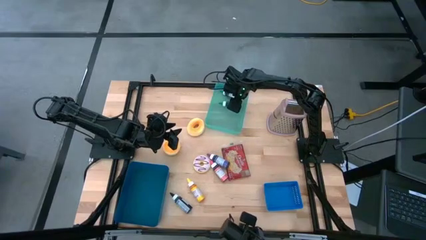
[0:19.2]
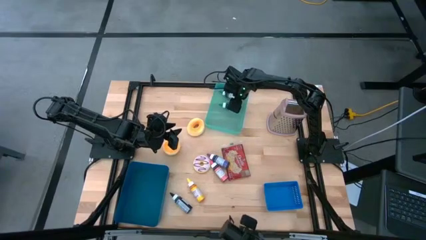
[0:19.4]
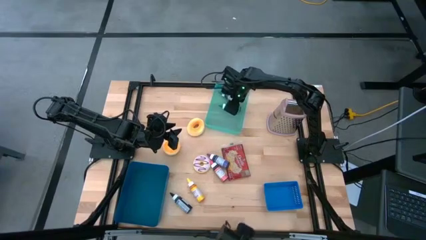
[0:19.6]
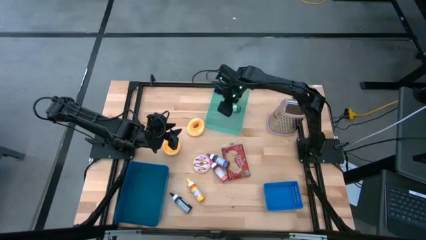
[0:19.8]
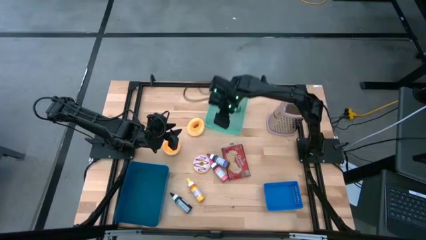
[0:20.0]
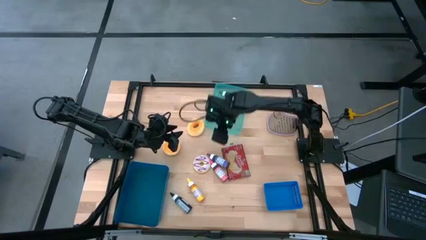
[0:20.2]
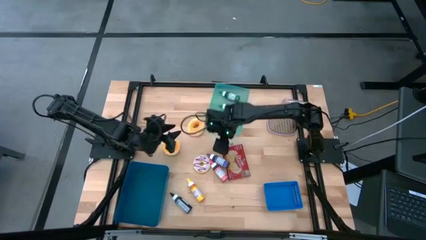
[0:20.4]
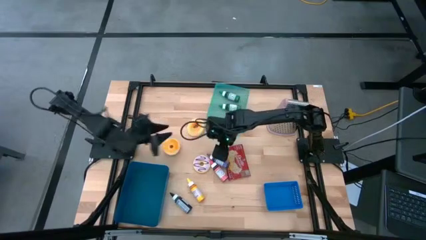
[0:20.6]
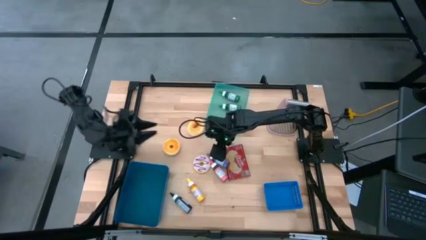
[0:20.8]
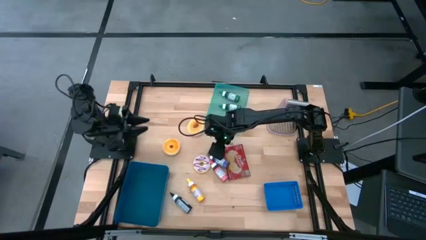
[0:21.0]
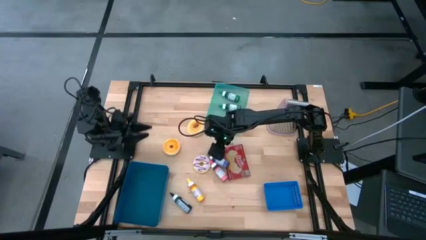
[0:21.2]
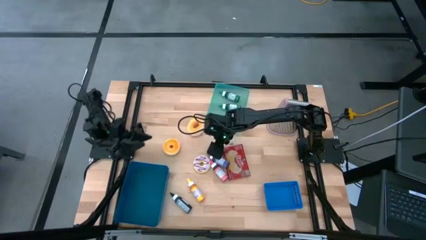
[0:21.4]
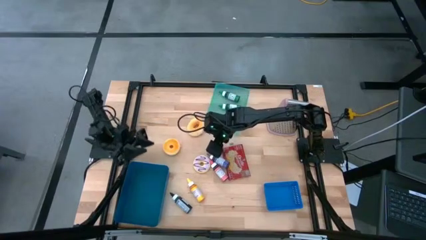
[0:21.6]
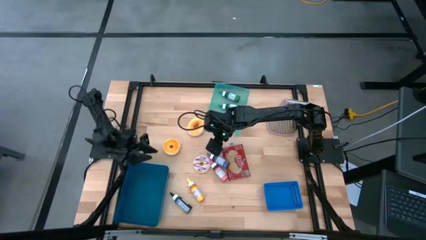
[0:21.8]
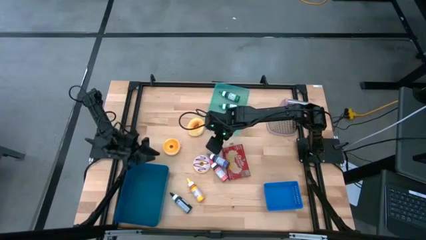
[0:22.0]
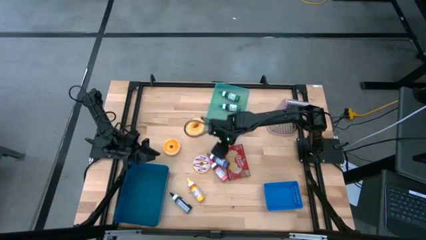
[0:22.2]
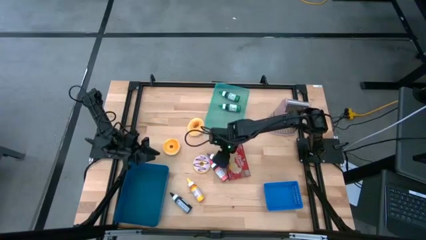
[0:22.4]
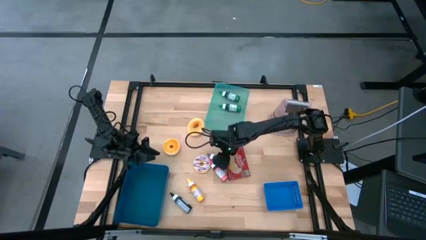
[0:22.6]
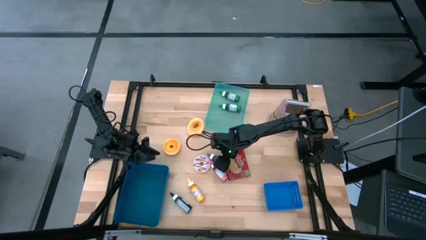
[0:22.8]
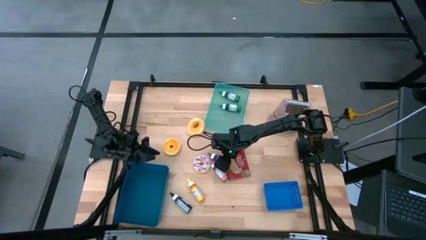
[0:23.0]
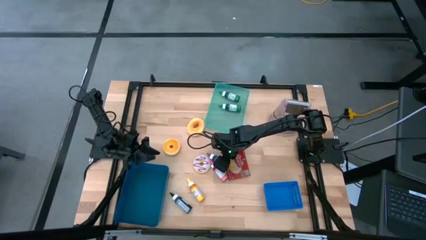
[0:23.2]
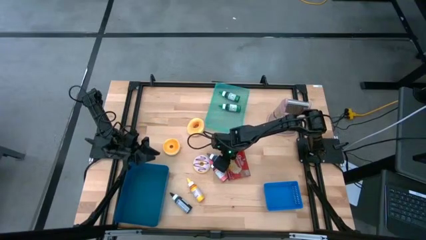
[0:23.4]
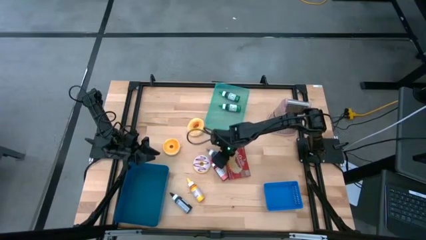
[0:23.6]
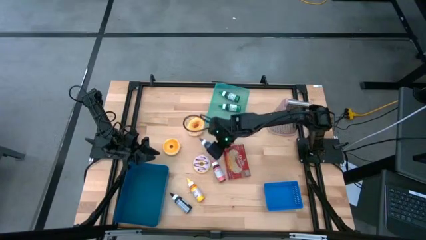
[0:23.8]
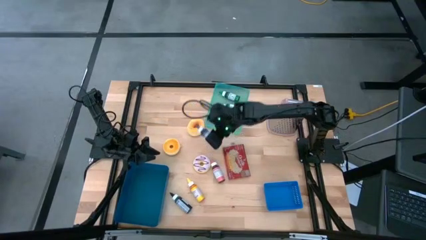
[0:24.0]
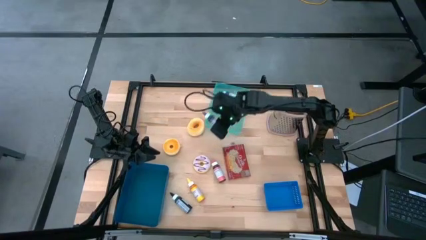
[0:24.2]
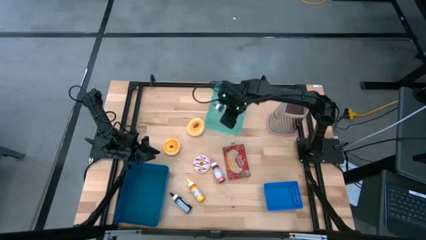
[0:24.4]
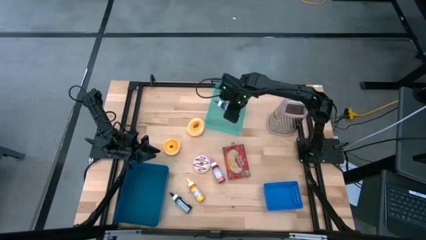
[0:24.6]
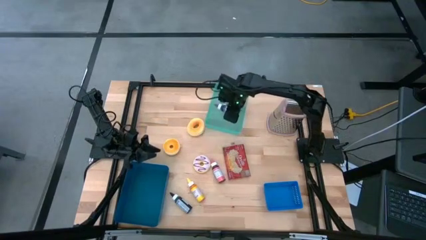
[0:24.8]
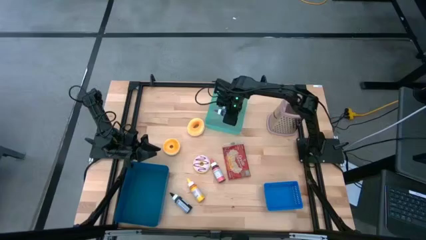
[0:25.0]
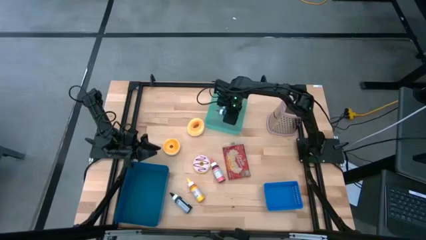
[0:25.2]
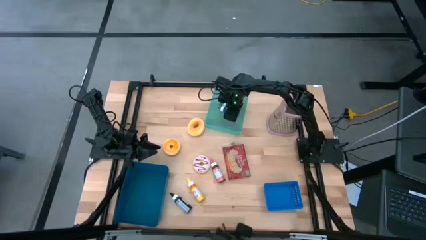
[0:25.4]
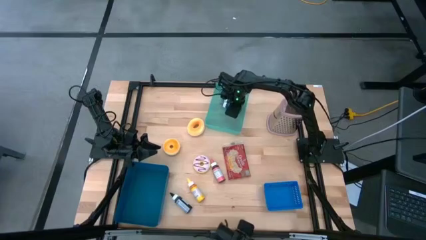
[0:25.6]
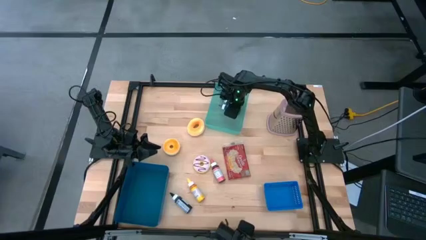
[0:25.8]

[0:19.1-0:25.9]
Put the violet food coloring into the green bin

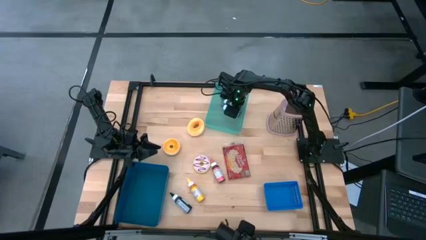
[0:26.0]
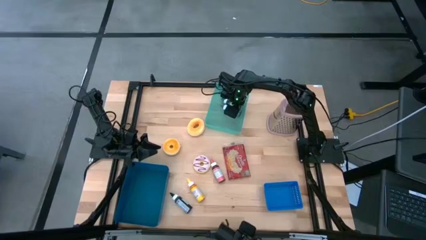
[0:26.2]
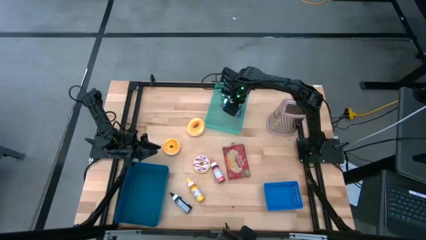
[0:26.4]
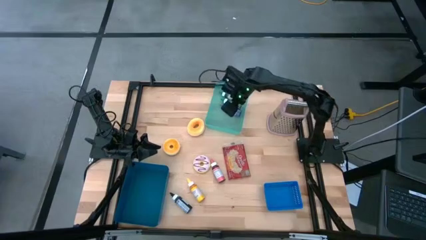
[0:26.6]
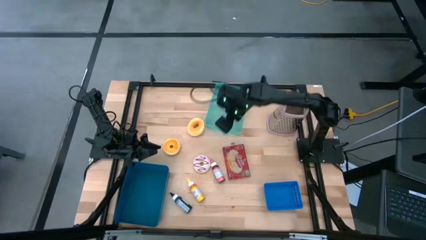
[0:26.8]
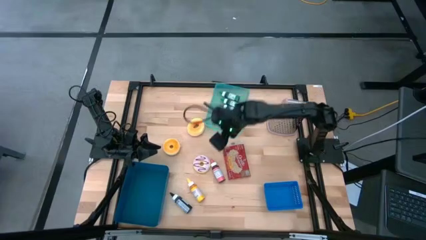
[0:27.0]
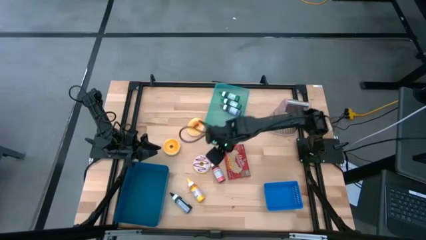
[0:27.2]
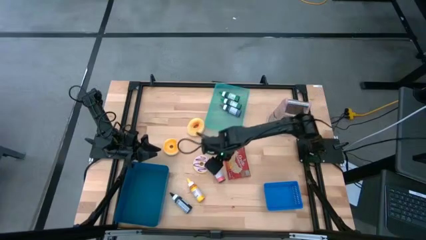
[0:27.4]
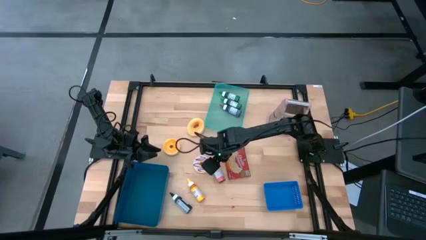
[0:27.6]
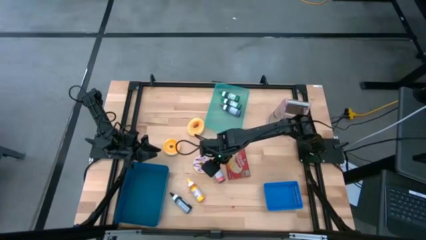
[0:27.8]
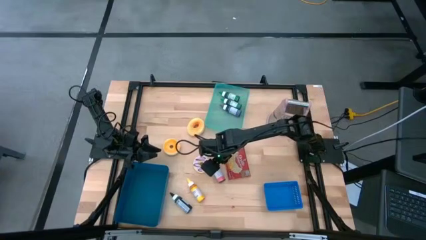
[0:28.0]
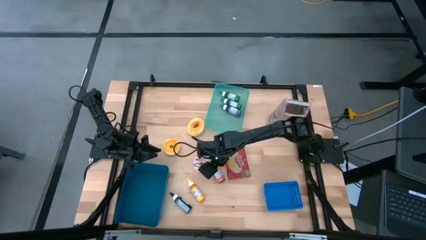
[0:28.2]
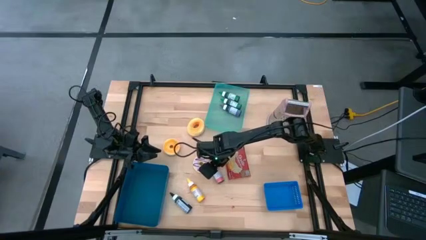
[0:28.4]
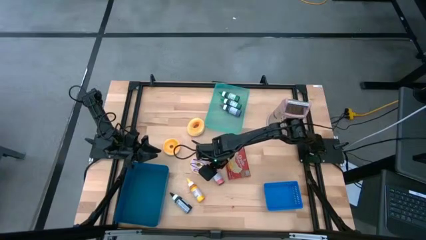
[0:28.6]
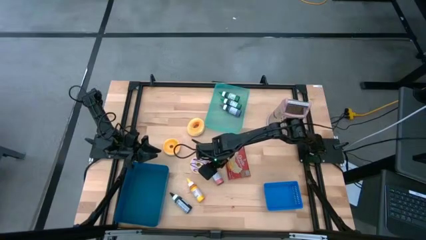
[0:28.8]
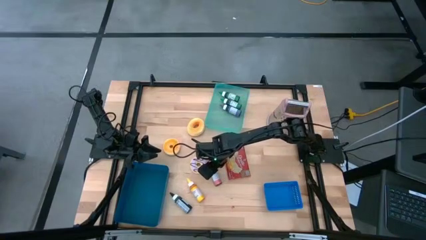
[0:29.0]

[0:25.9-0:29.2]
Put the pink food coloring into the green bin

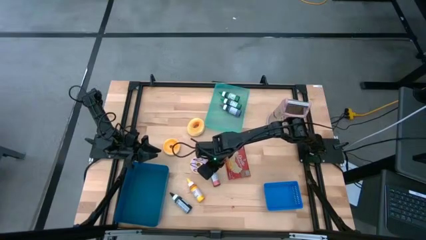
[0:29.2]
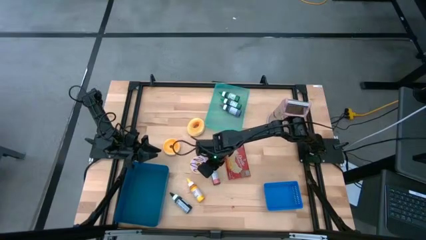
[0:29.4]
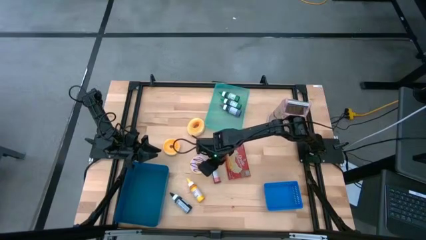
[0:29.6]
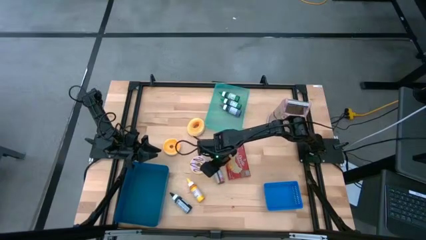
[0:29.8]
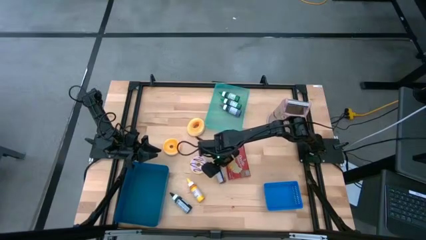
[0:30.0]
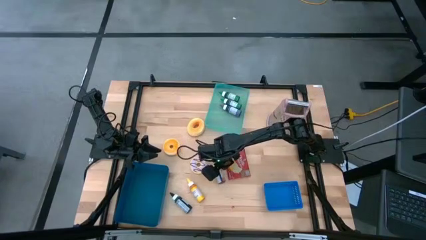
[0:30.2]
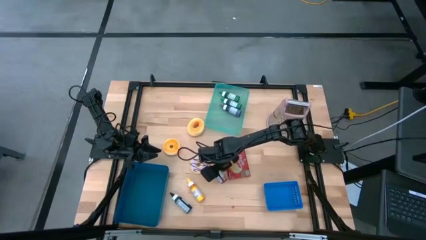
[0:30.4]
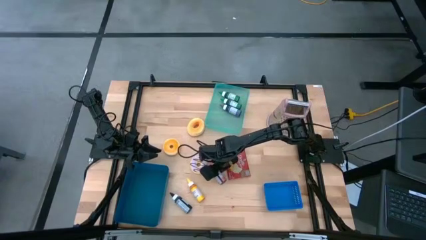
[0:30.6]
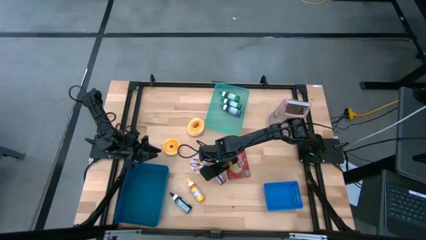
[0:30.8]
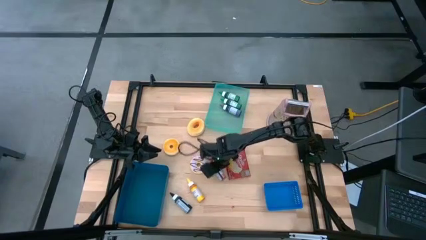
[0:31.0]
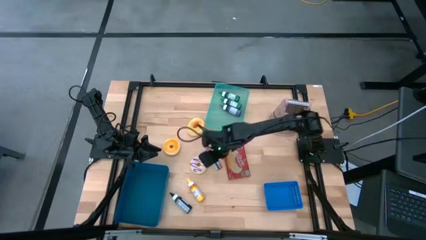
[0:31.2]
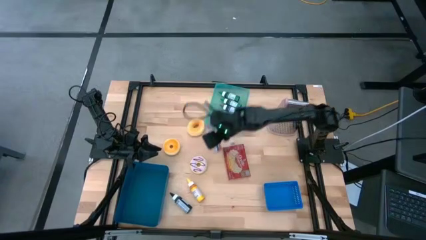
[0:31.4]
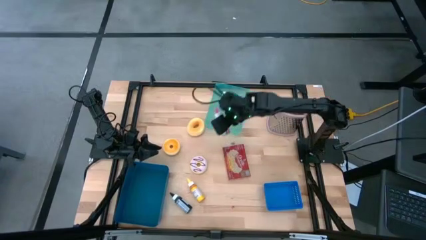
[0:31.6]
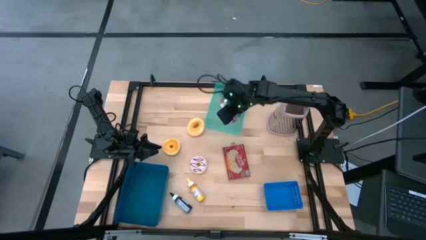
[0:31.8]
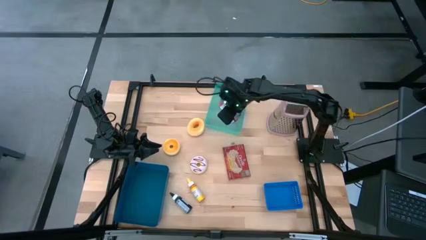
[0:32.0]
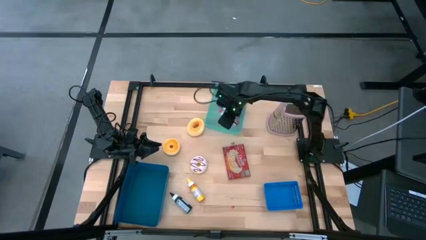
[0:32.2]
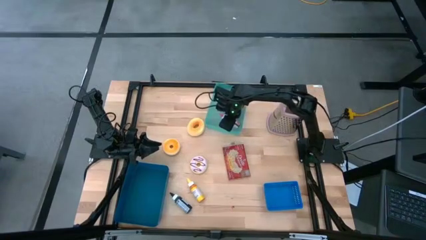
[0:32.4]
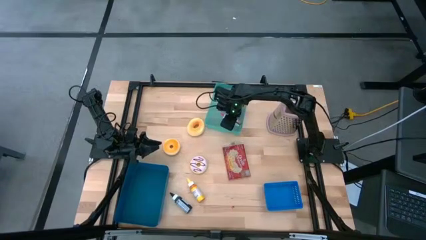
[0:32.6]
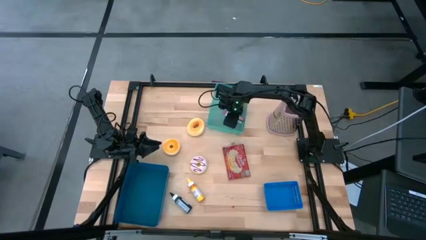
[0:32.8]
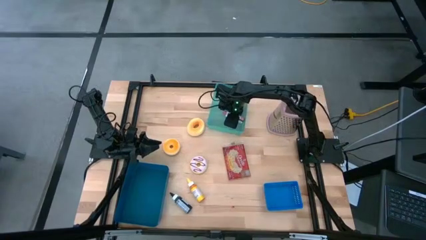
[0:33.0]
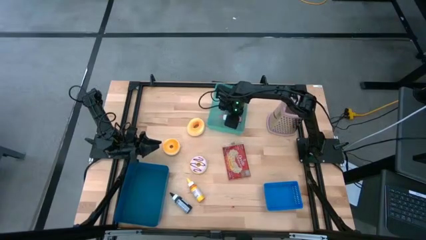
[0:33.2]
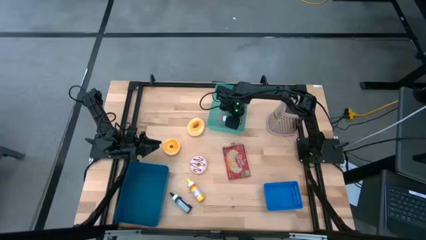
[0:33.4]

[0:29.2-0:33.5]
Put the pink food coloring into the green bin

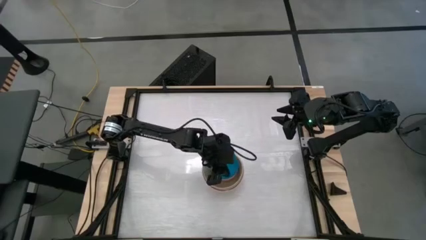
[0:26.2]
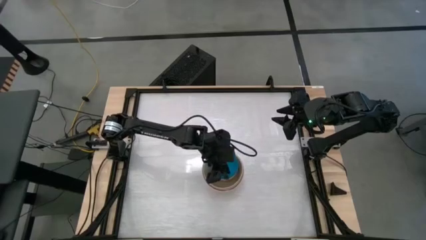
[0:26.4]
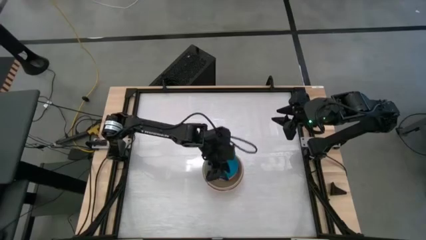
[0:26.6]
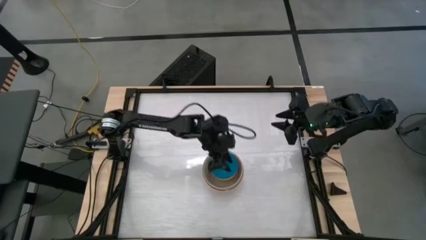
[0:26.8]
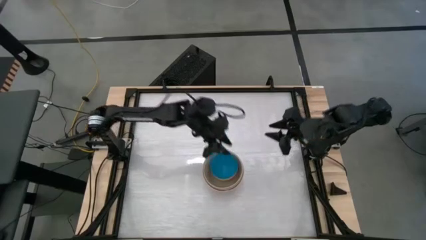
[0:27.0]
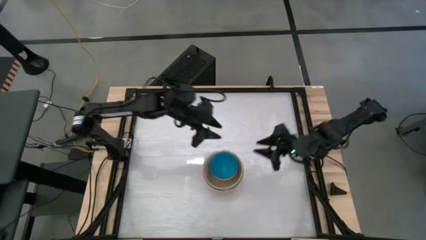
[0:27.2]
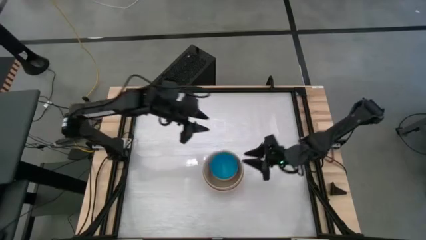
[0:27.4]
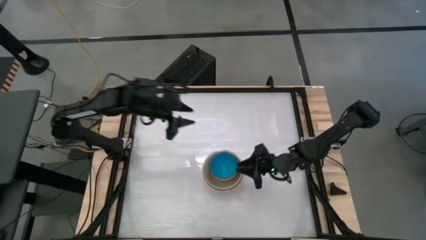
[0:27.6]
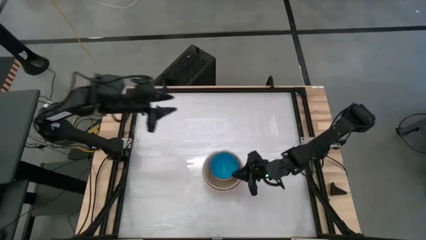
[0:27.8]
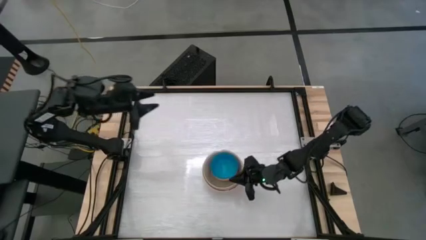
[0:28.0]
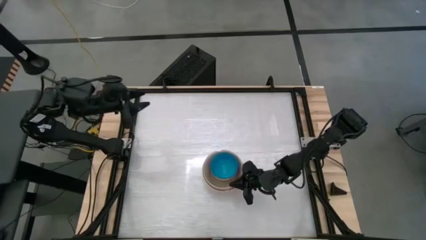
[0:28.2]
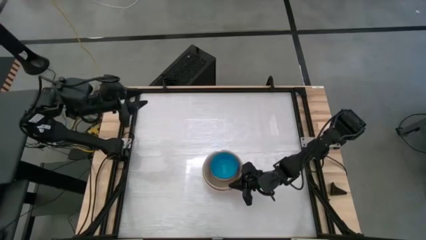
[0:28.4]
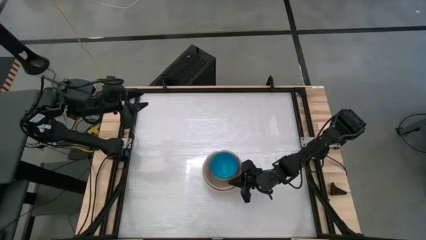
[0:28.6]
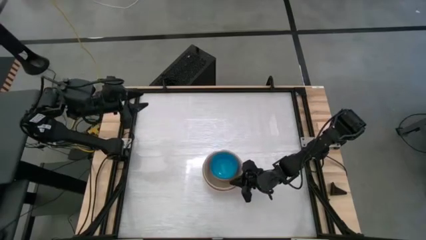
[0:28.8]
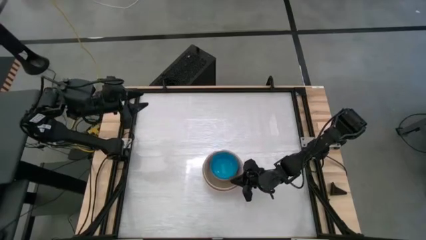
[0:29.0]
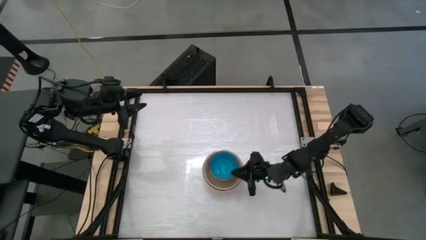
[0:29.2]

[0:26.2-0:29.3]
Adjust the stacked bowls
